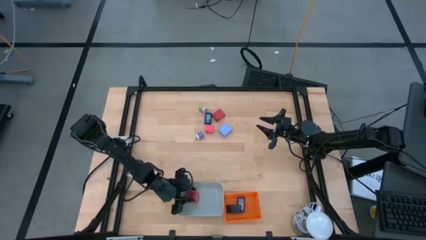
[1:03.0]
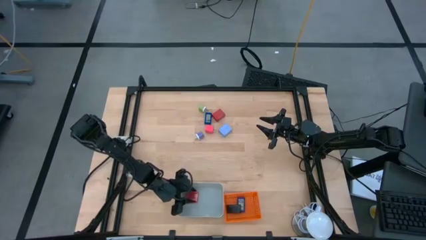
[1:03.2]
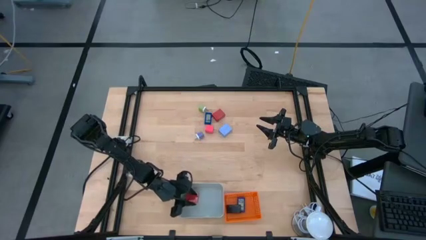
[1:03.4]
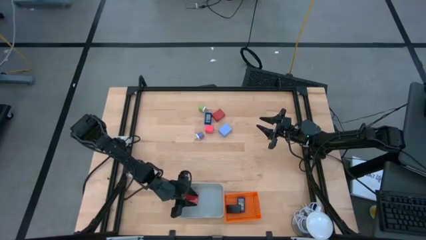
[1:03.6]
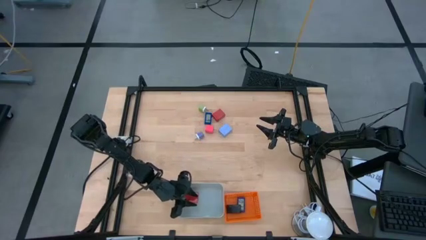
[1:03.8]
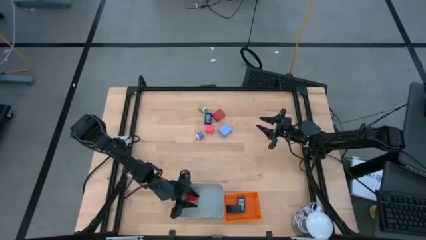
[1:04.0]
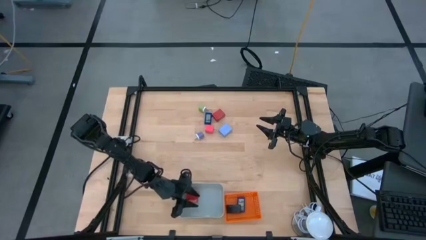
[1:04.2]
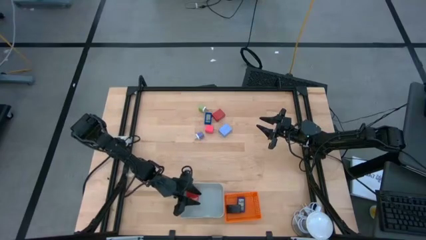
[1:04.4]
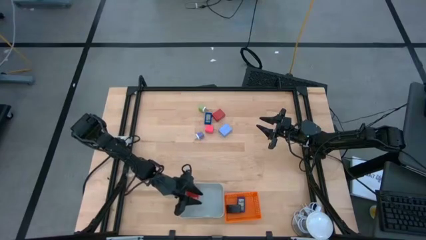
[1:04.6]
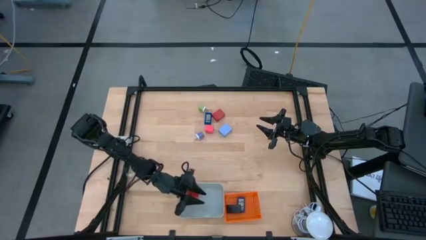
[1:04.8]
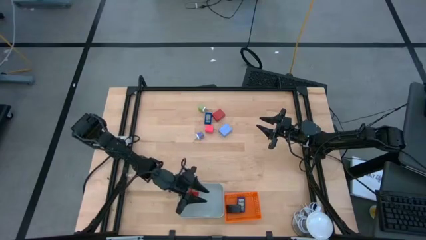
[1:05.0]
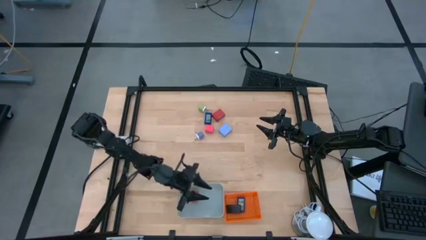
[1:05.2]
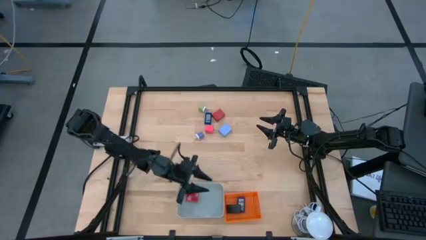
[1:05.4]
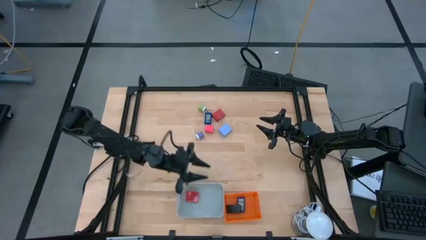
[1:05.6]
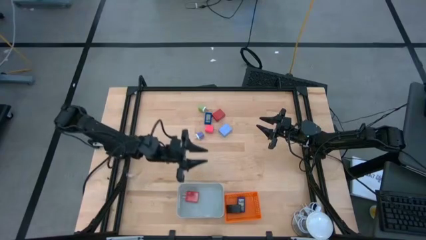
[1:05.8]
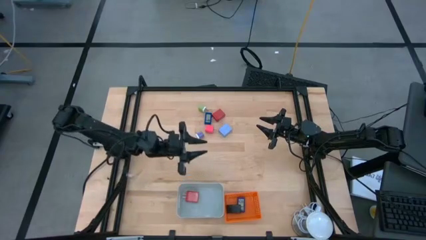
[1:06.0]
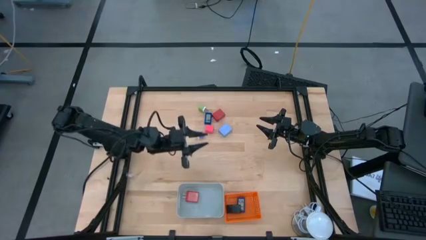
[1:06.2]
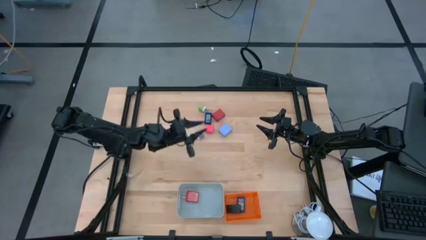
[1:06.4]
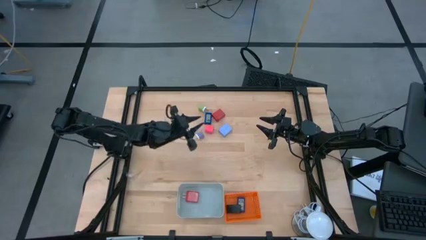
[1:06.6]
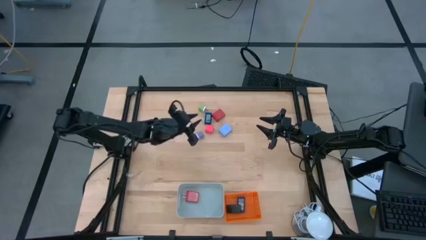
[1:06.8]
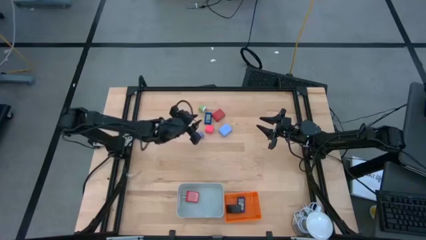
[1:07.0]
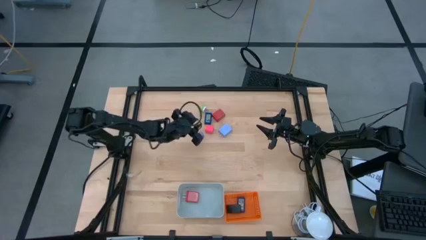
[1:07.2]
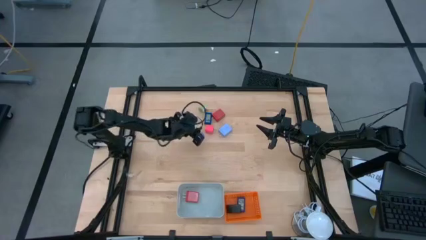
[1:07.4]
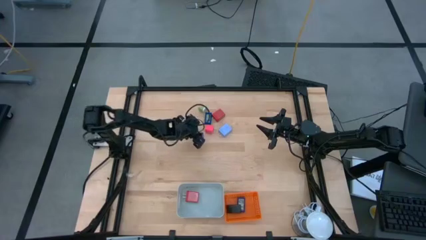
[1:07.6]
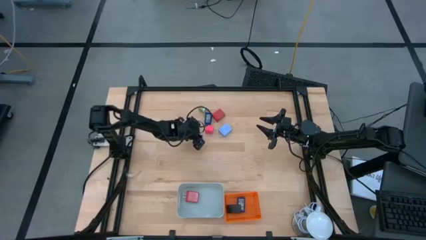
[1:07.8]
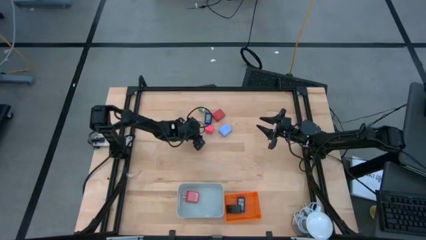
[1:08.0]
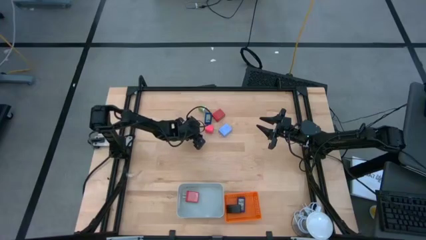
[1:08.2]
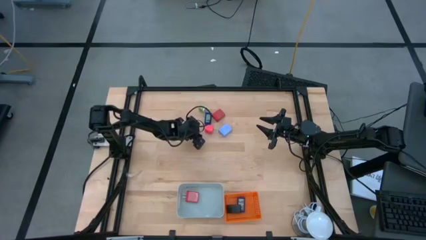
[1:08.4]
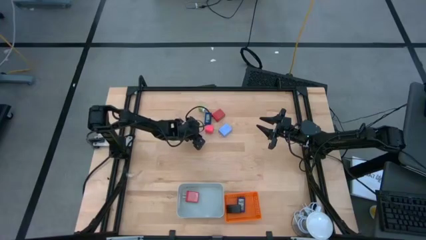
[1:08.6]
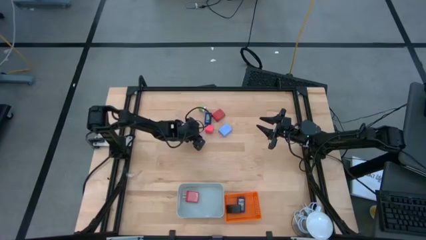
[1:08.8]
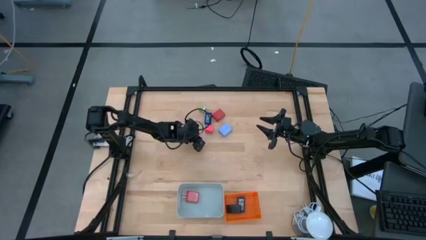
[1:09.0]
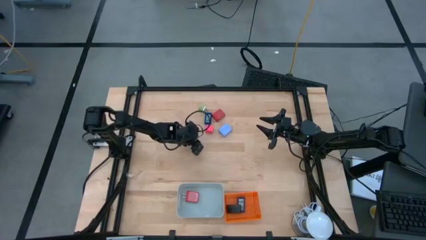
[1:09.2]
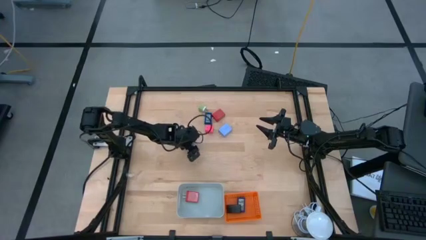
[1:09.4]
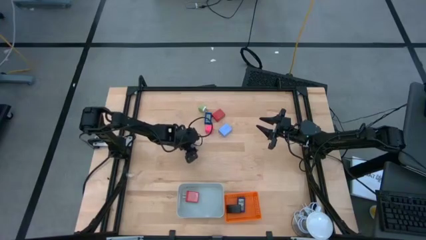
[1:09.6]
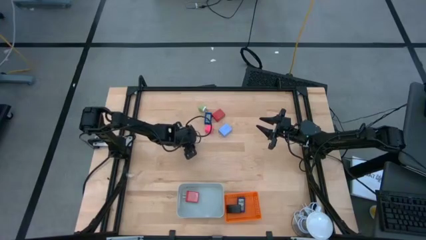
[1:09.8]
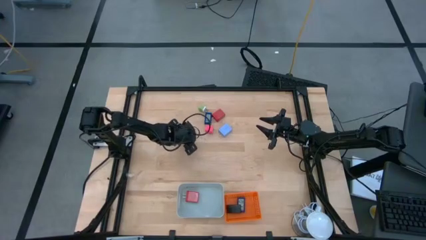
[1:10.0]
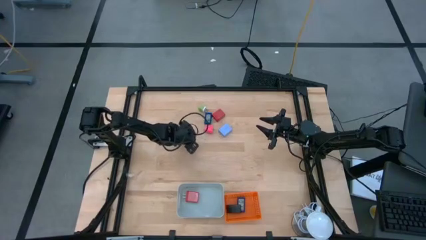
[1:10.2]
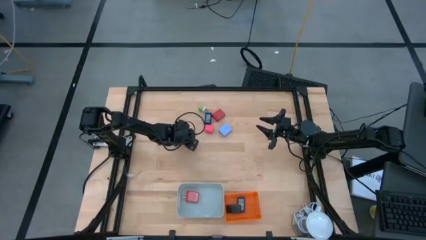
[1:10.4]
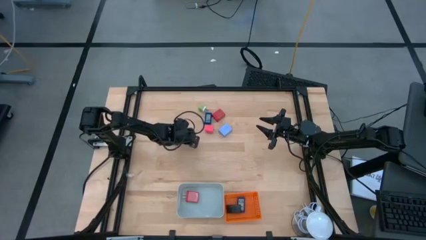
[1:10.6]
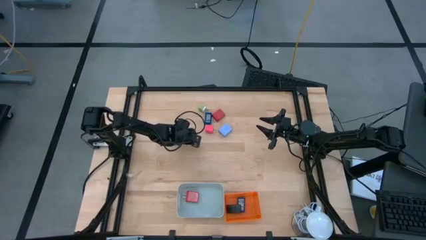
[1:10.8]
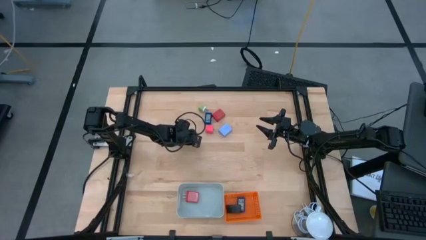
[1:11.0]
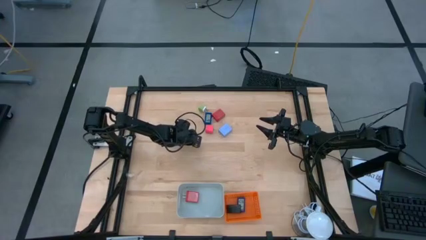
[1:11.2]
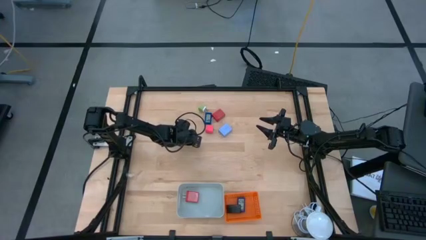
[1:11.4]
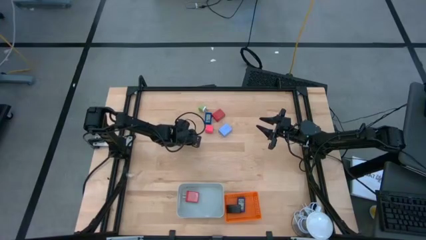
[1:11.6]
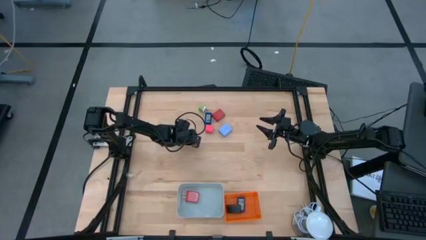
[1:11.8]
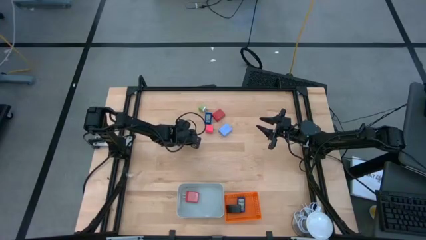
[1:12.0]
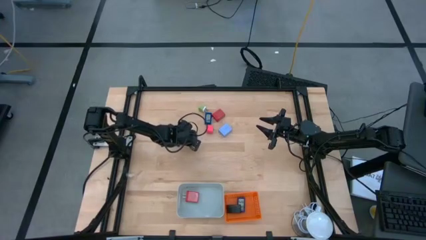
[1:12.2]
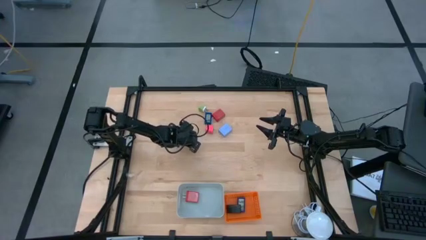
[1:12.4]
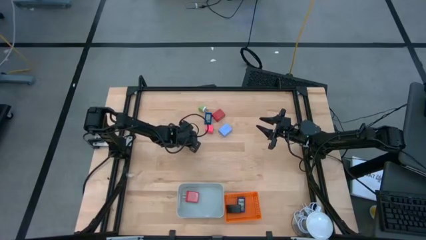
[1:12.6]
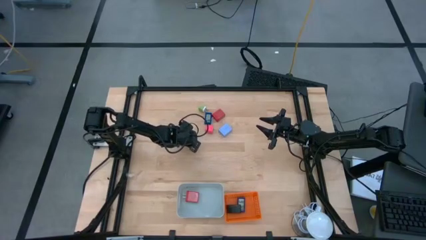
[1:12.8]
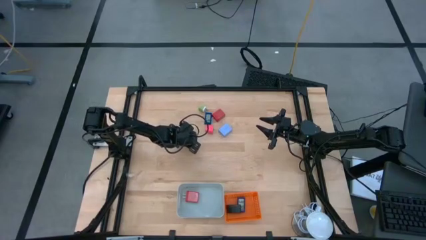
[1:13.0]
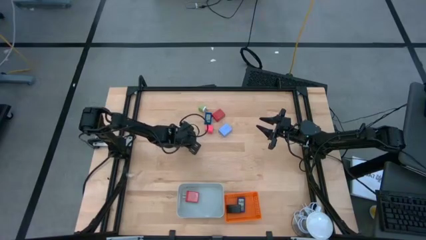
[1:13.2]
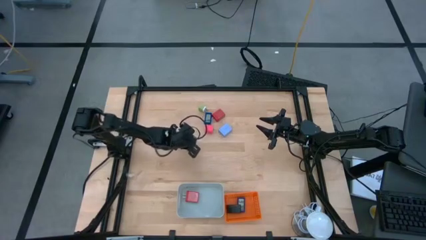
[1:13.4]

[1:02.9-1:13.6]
Task: Pick & Place Office items
Put the white violet charger adapter into the gray bin

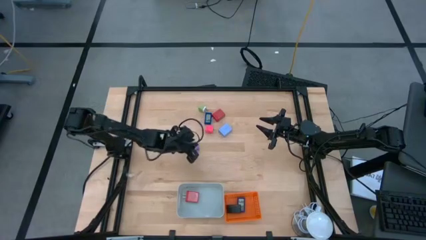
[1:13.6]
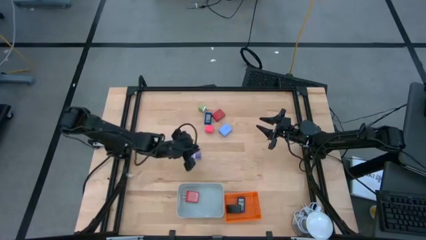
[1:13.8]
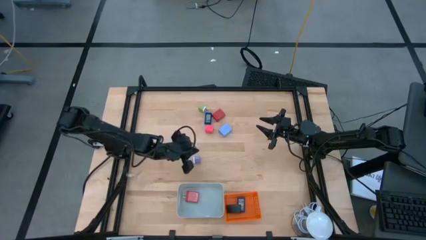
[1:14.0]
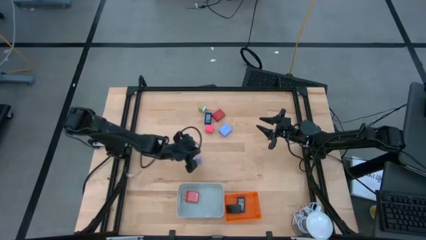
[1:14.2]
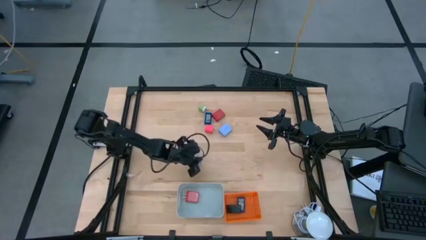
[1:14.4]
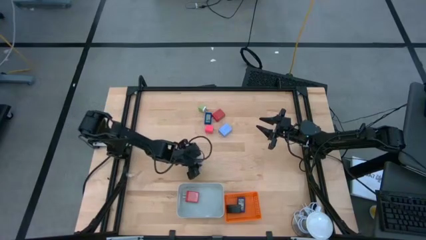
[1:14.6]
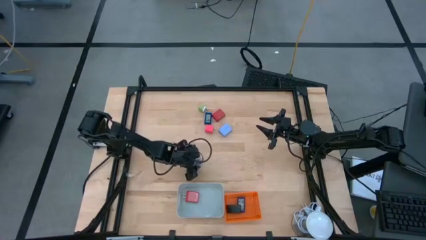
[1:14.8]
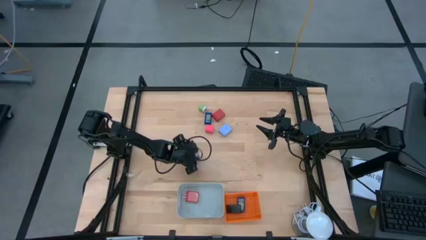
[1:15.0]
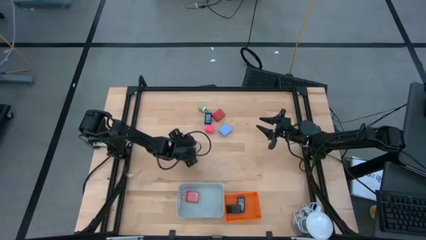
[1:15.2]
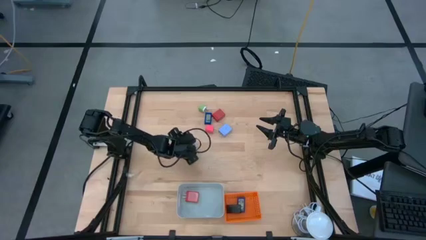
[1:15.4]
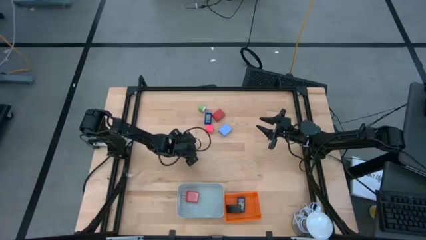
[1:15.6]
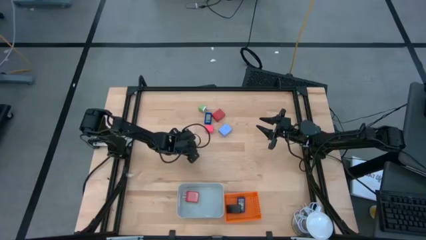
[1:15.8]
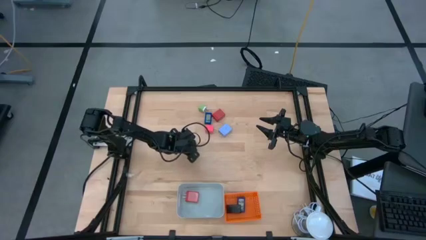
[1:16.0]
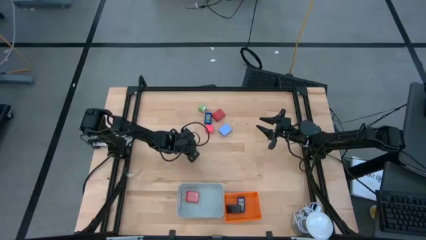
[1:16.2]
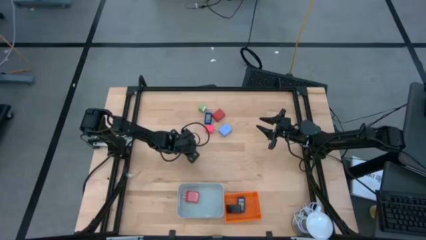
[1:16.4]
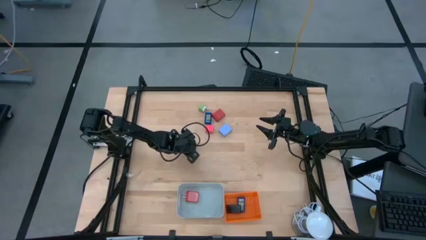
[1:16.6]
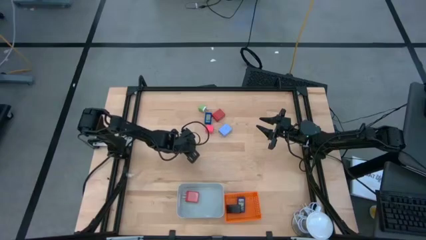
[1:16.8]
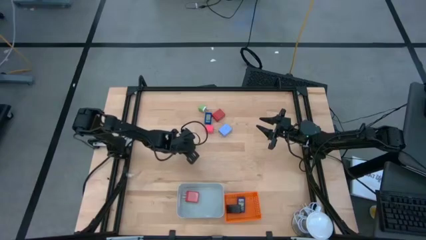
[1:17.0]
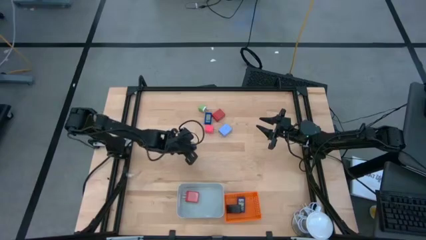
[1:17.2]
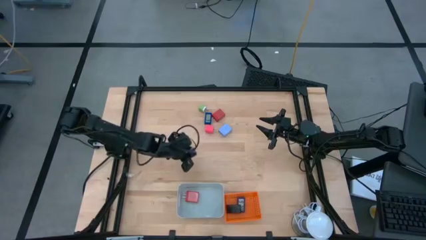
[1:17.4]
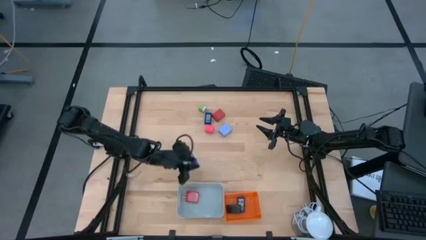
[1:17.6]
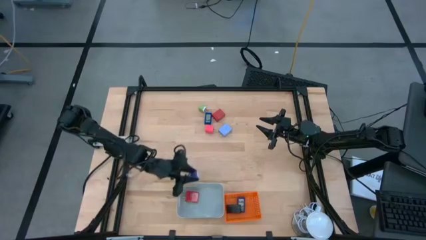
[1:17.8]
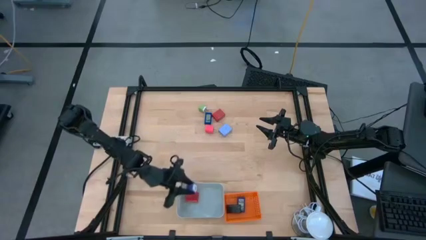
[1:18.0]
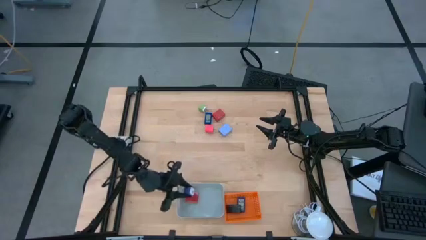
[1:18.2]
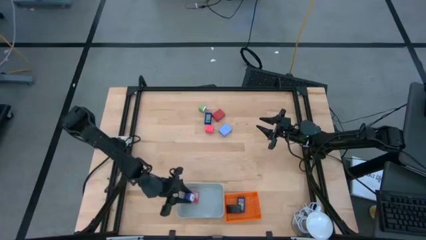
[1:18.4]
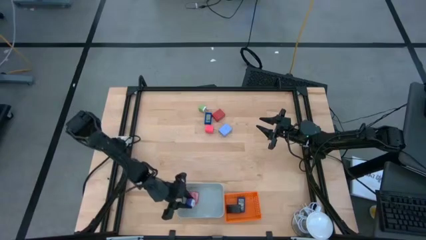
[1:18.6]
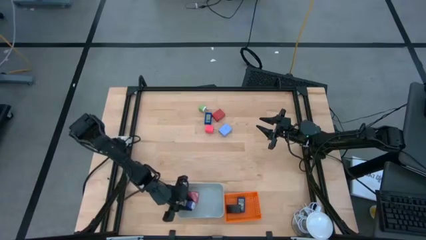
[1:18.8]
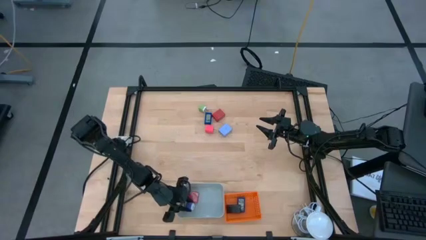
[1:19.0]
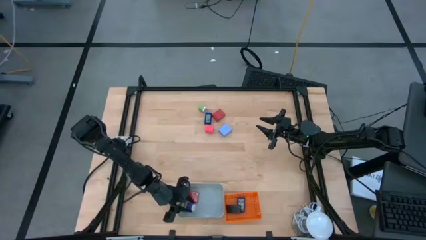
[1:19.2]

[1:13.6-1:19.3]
Put the white violet charger adapter into the gray bin
